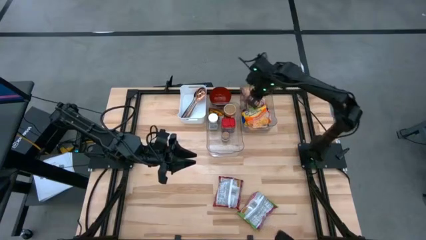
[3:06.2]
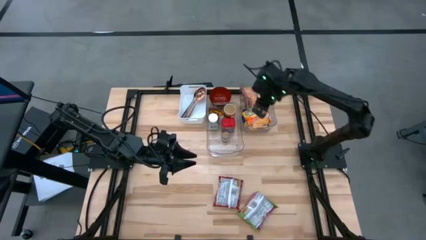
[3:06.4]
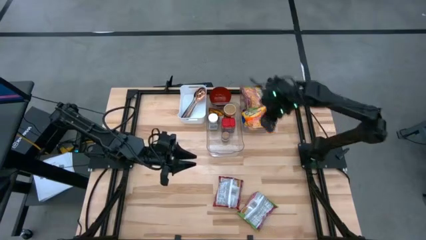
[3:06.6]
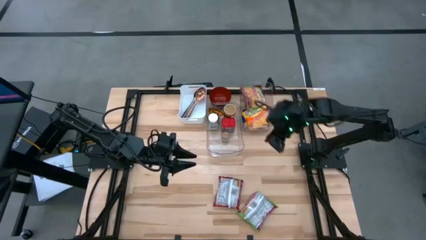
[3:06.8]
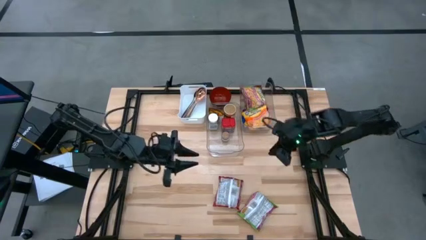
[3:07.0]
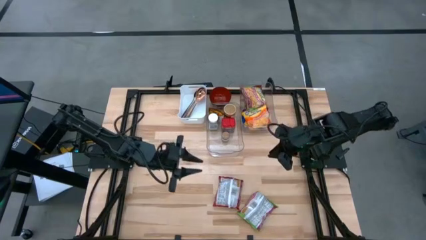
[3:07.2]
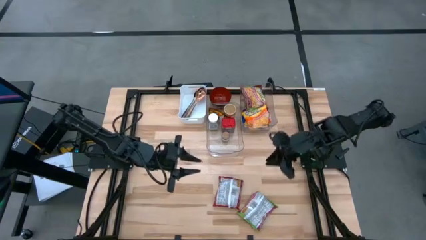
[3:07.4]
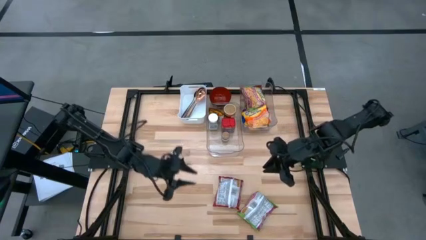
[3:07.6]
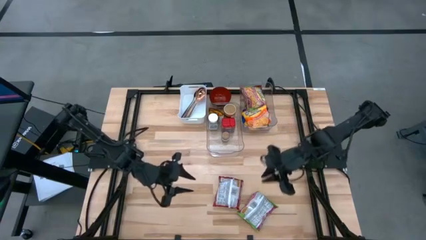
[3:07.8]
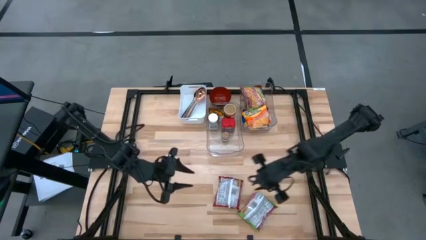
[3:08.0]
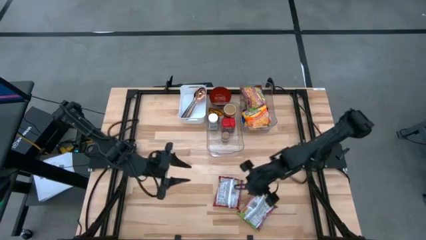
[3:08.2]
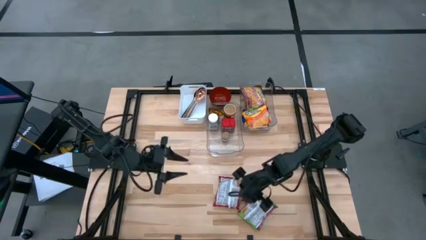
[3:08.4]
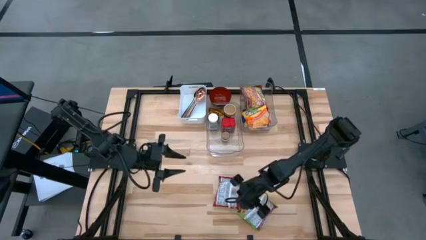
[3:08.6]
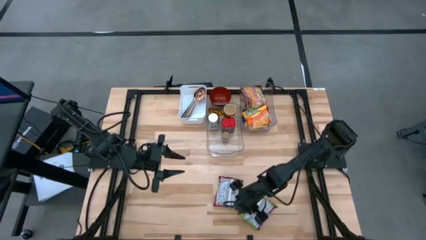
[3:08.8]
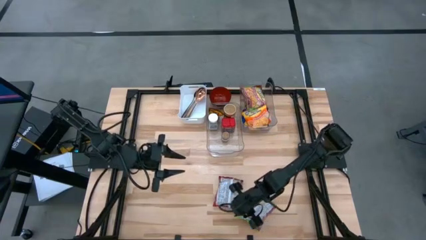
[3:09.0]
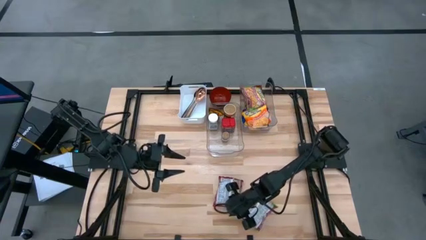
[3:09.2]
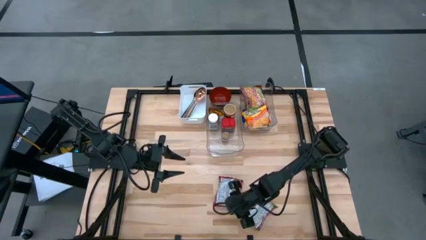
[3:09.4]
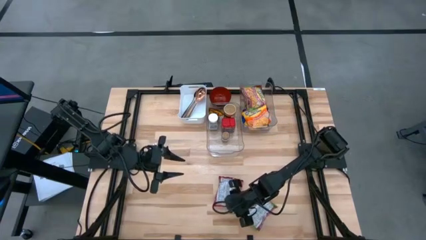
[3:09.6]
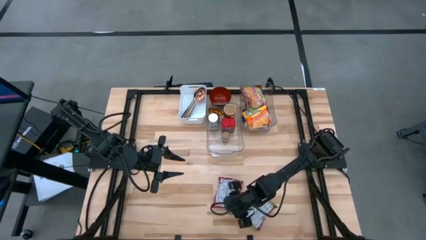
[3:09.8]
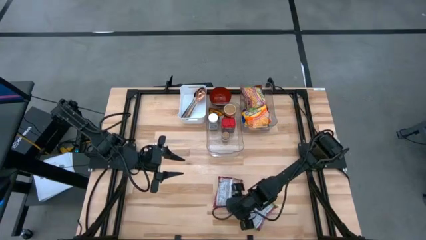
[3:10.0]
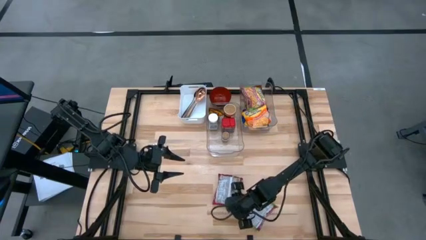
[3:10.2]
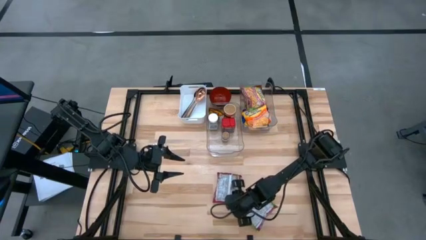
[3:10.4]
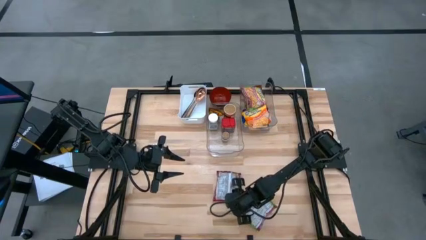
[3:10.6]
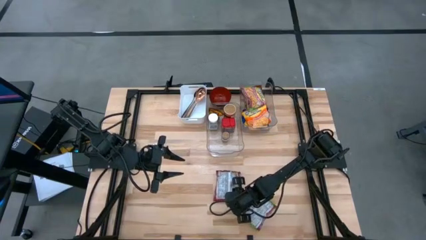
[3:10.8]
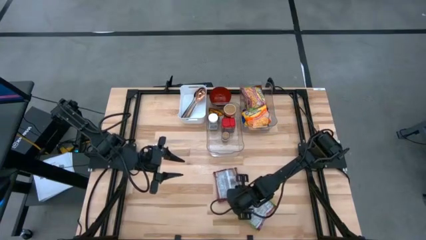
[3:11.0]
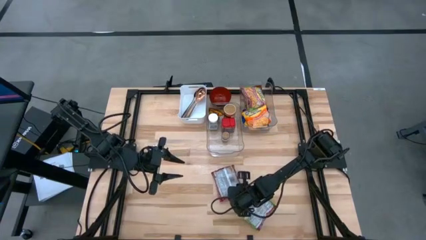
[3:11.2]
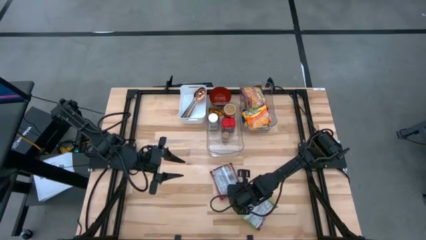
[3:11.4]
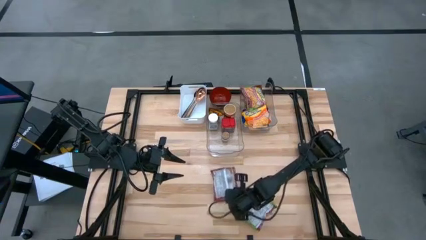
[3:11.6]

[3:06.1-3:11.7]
Task: Pick & Place Food Item
Put the red noodle pack into the right transparent bin

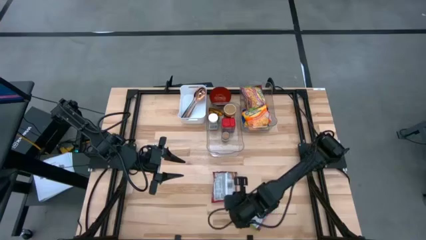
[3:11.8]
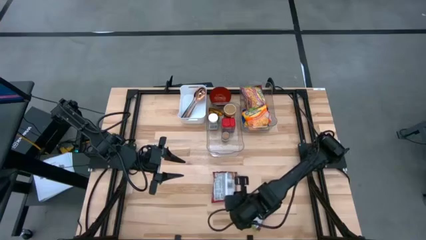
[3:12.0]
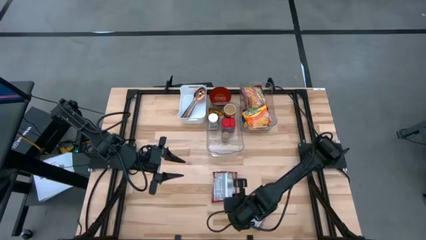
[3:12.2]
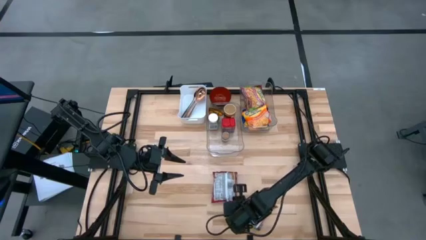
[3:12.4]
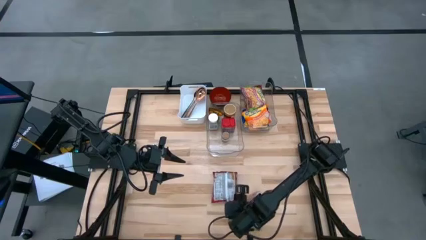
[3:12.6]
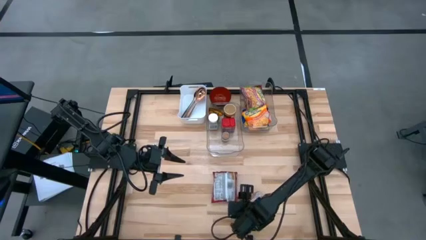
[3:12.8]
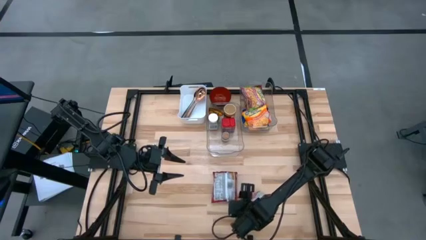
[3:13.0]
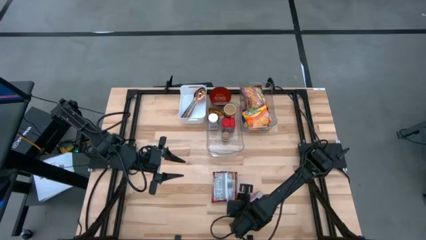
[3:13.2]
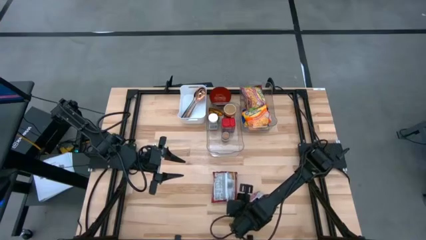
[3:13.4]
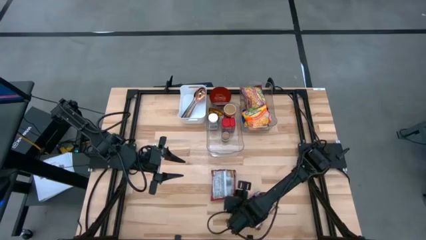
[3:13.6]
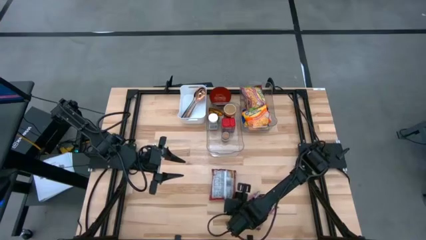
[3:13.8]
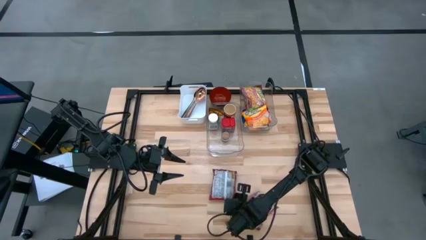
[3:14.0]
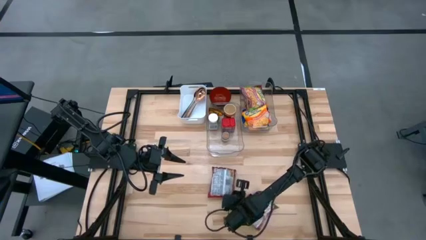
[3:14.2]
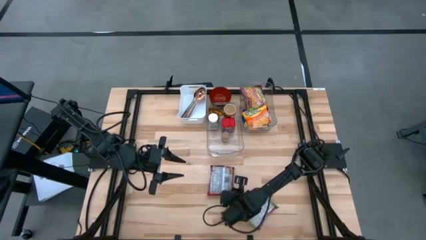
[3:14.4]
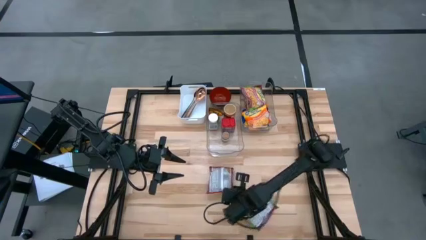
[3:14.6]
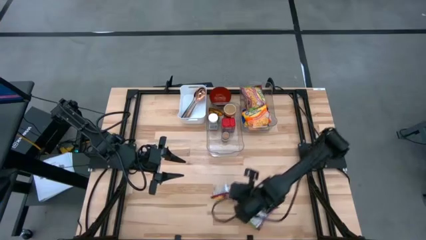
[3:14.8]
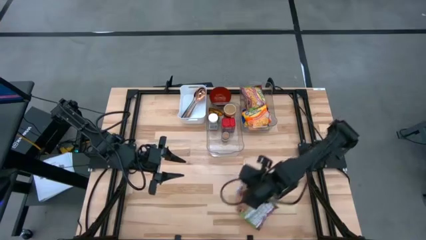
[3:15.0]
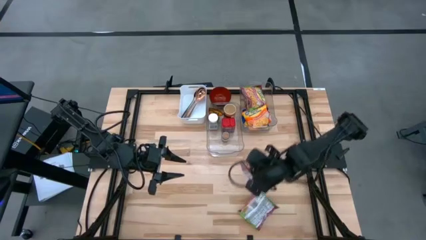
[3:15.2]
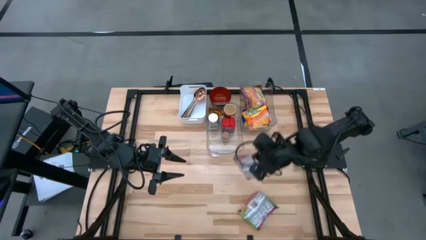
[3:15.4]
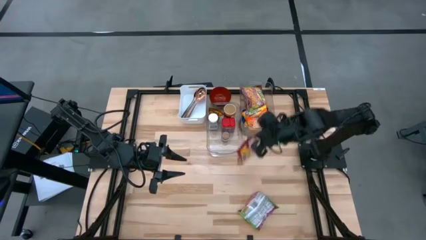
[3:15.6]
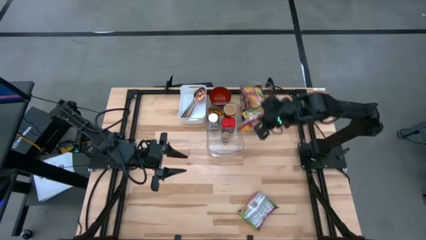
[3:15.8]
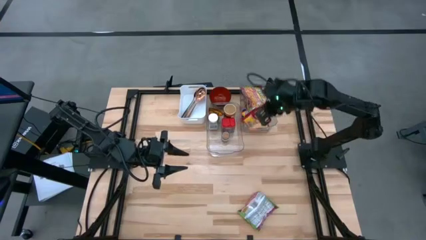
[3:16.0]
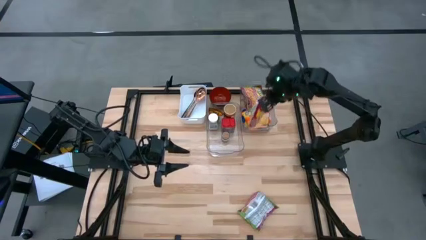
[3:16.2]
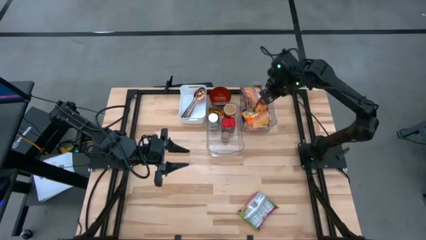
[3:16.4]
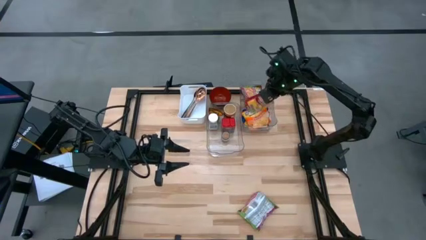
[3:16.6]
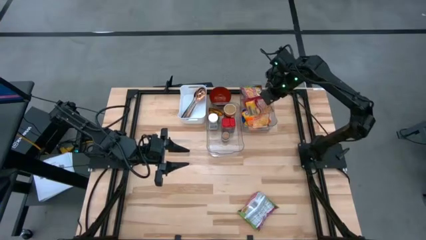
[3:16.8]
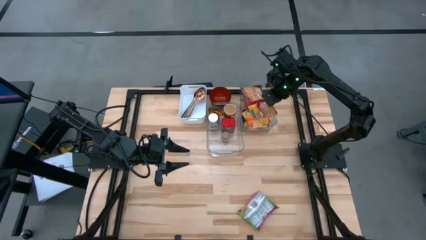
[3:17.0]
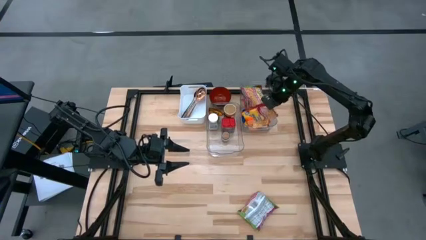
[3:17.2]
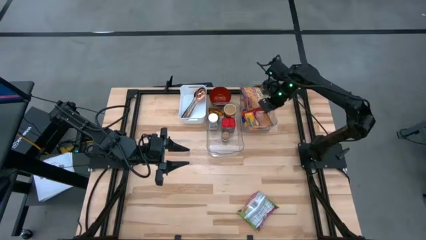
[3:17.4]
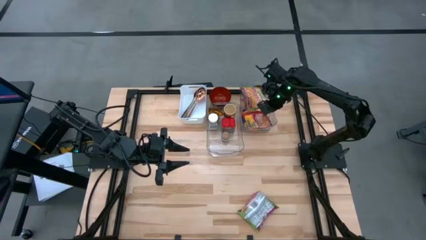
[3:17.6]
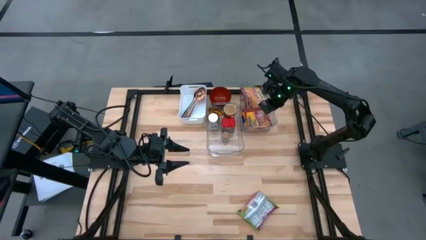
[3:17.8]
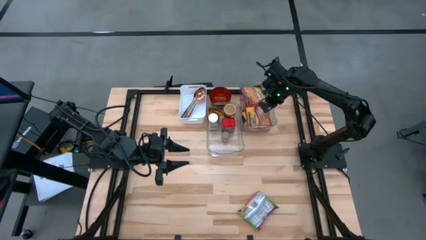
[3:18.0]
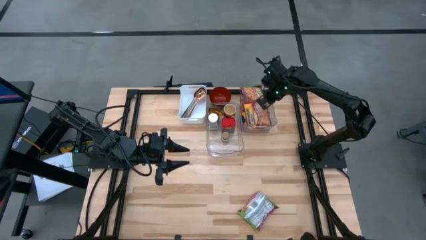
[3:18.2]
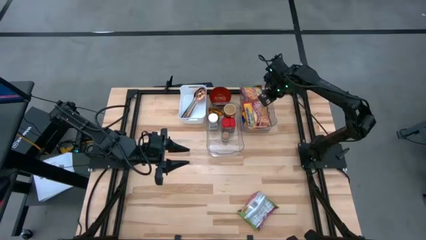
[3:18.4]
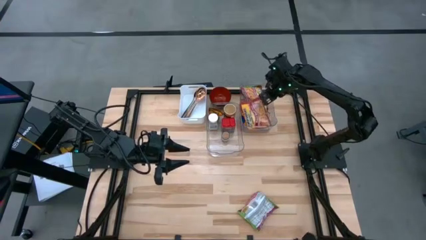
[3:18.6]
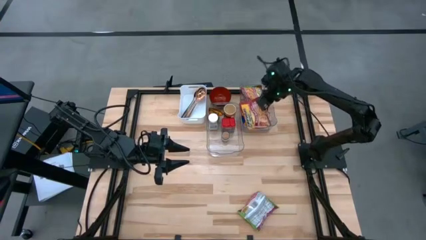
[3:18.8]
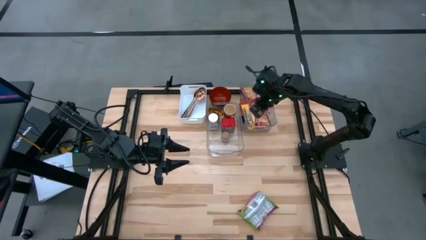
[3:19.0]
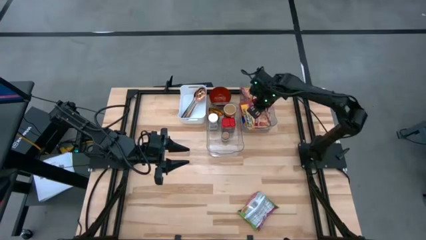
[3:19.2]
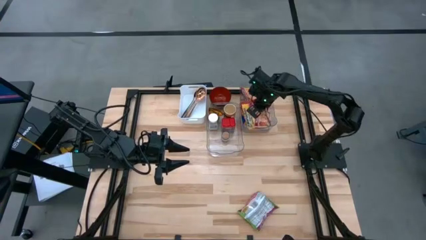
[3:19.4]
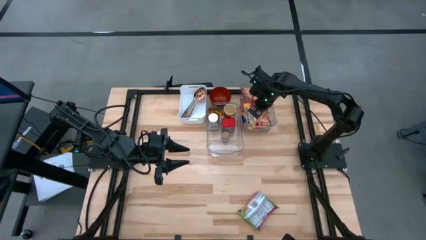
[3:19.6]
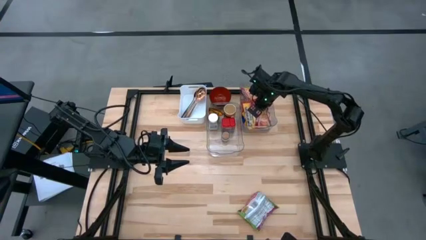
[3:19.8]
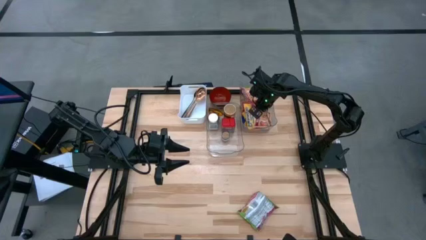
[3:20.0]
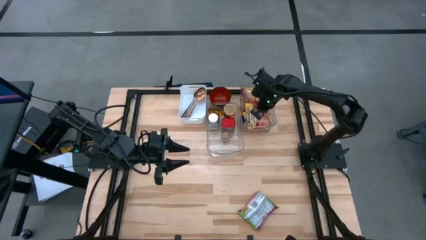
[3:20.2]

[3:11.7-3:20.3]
Put the red noodle pack into the right transparent bin
